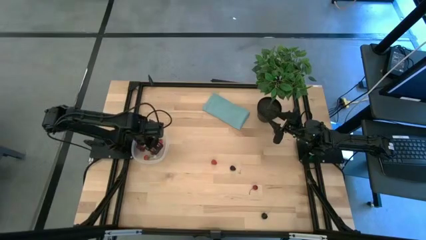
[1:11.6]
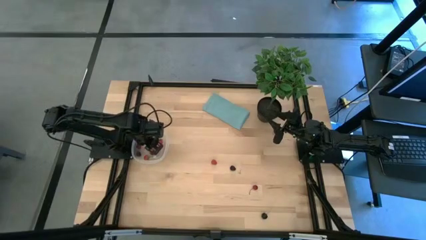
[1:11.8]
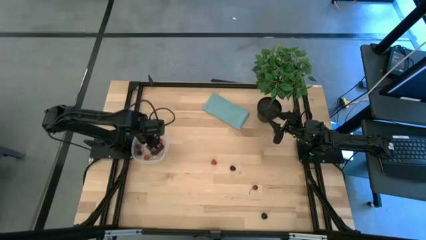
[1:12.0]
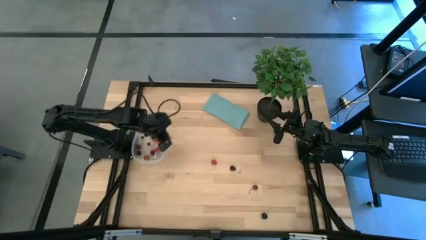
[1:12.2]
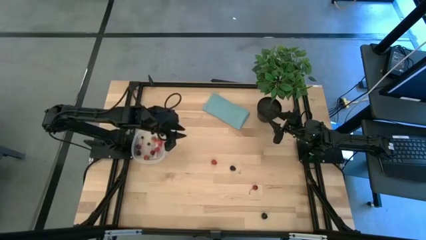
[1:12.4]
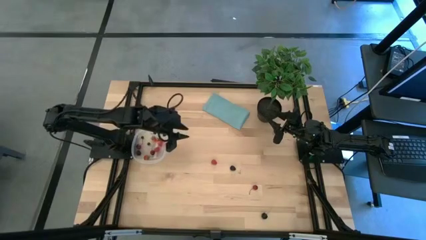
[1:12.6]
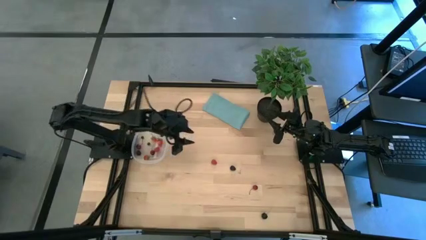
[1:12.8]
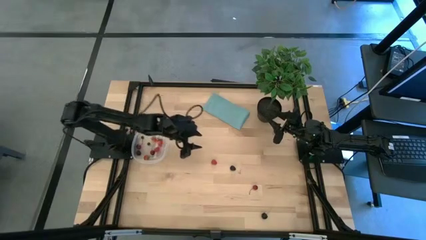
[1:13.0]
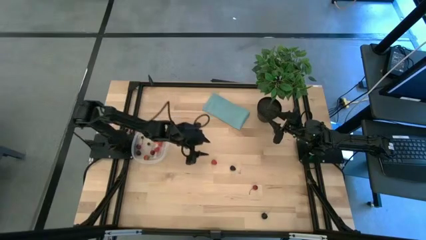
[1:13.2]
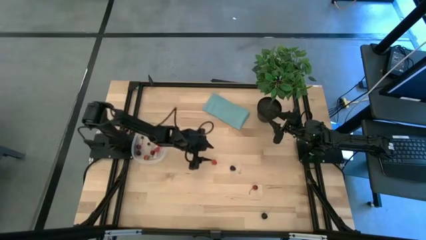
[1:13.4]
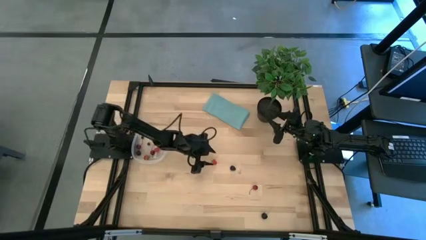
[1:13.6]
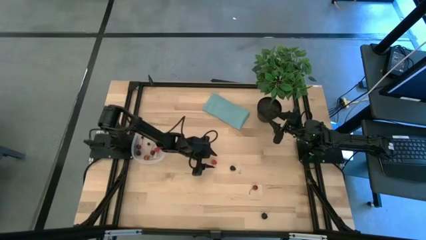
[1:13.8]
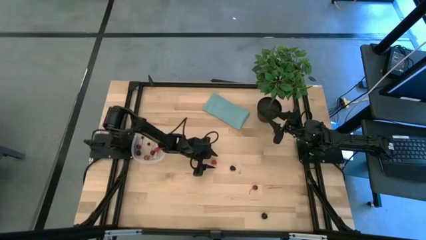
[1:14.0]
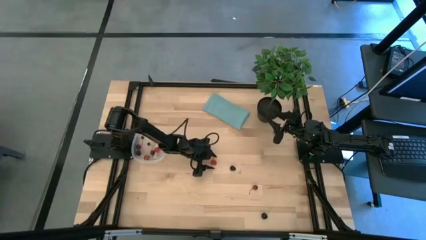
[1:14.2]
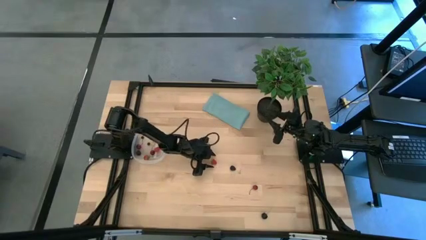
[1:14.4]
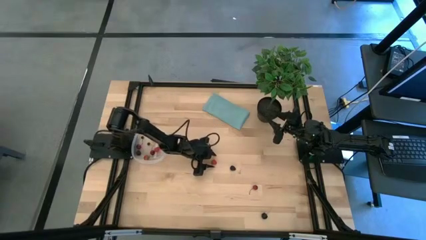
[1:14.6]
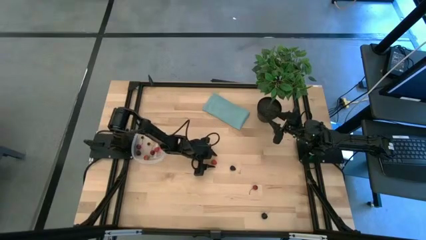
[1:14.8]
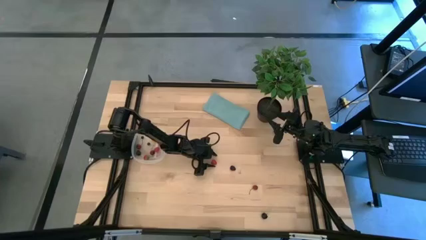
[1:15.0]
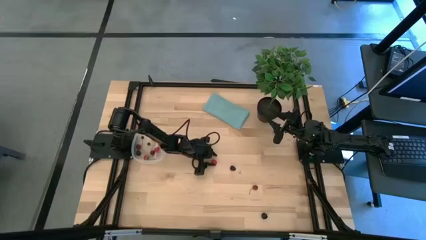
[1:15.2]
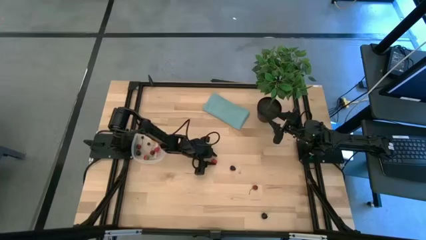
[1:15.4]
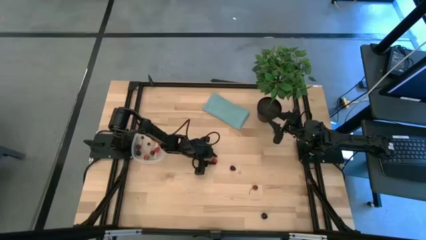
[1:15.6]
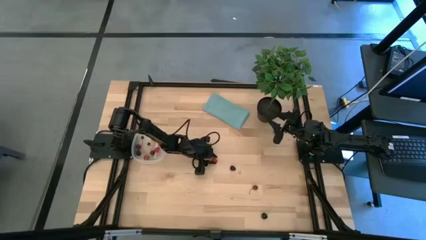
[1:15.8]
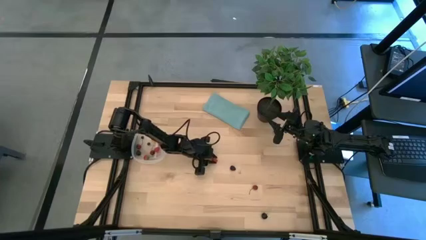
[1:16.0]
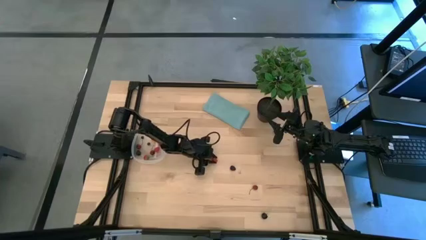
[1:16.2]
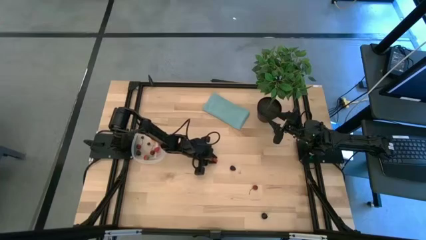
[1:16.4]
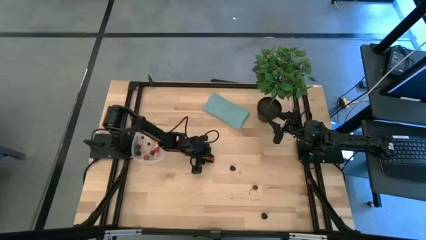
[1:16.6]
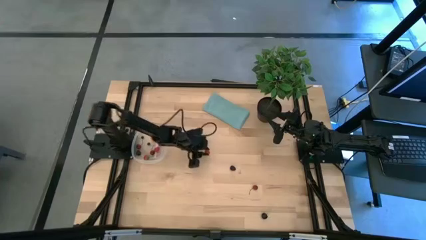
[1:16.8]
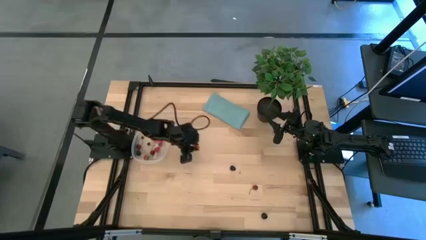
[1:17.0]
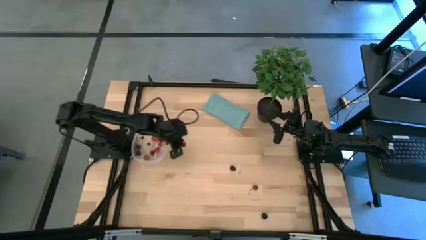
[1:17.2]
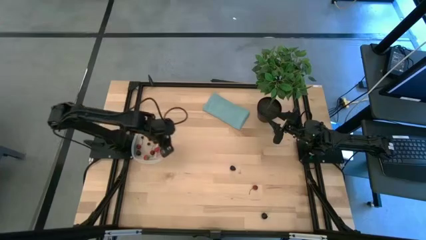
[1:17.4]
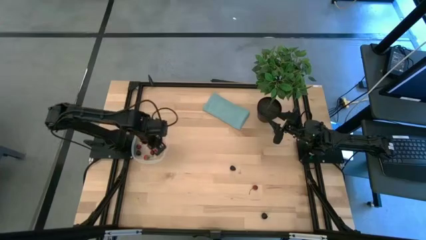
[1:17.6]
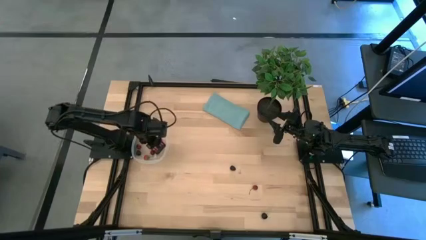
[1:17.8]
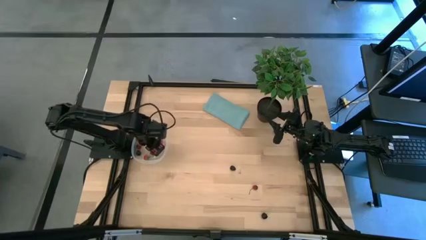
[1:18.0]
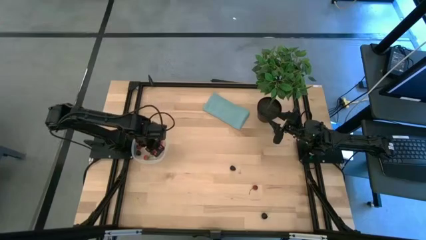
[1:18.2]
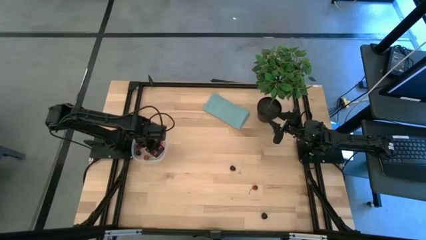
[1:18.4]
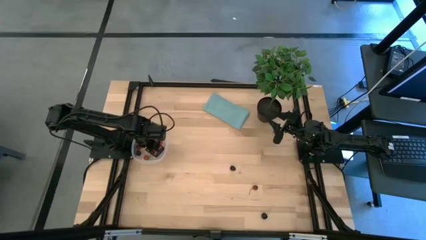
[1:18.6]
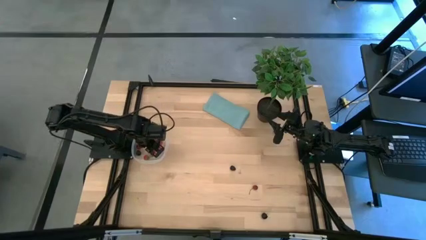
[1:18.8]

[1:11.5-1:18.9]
Task: Pick and placing Produce into tupperware
Put the red raspberry into the transparent bin

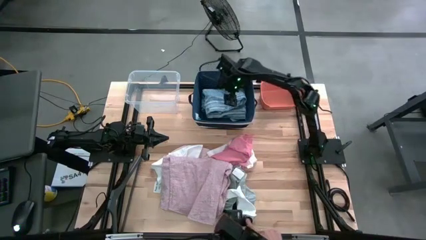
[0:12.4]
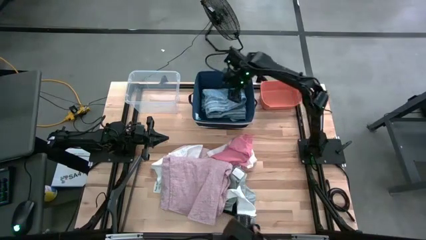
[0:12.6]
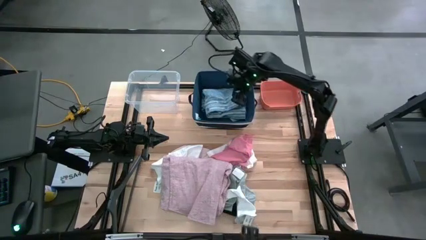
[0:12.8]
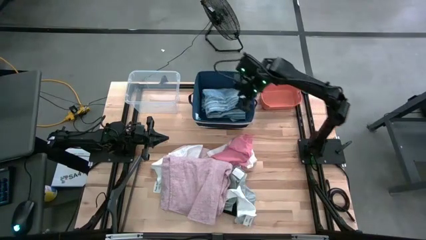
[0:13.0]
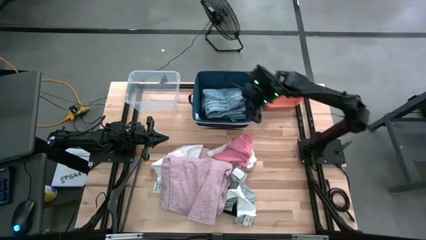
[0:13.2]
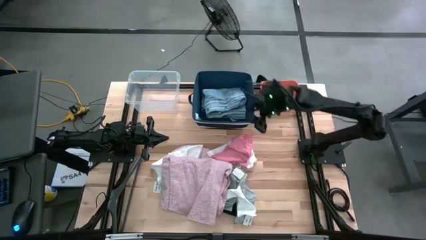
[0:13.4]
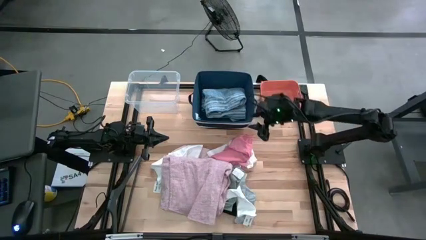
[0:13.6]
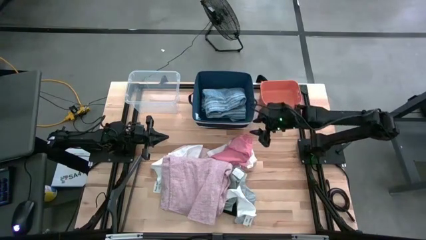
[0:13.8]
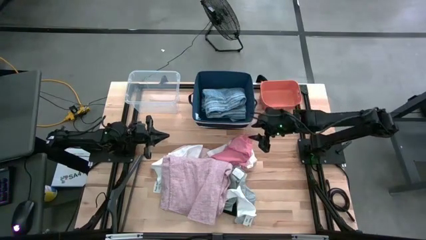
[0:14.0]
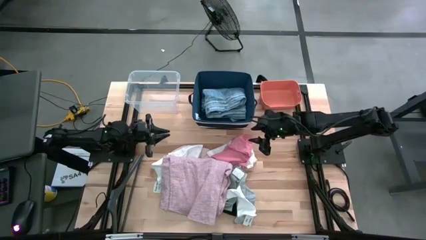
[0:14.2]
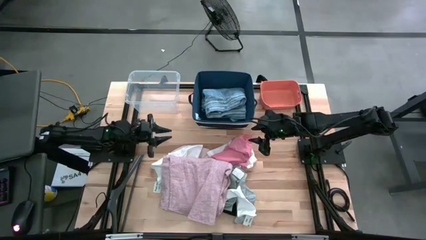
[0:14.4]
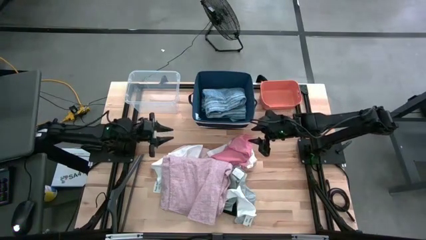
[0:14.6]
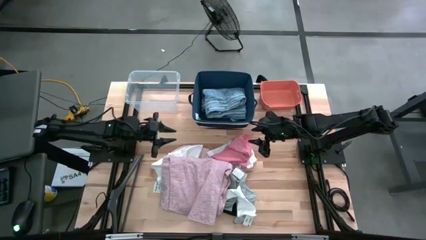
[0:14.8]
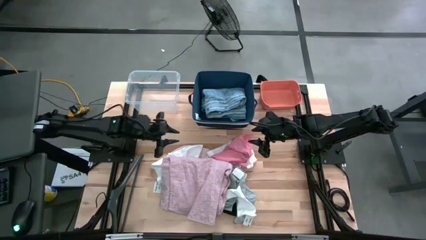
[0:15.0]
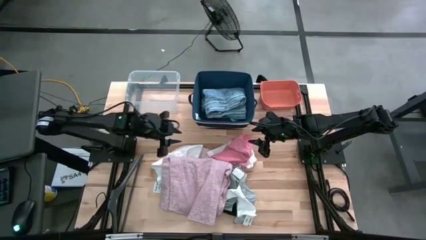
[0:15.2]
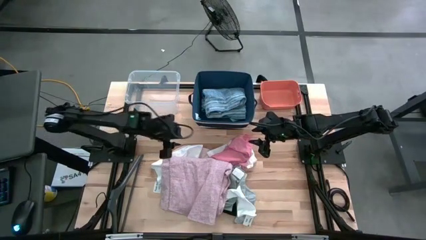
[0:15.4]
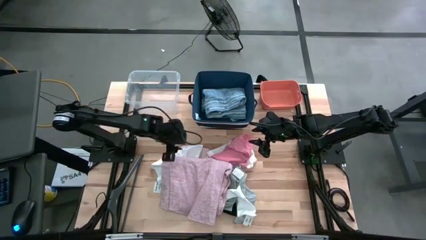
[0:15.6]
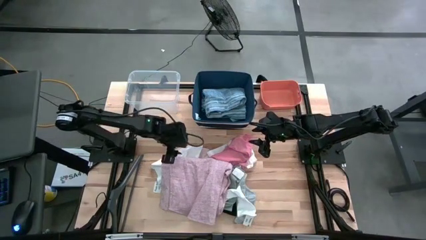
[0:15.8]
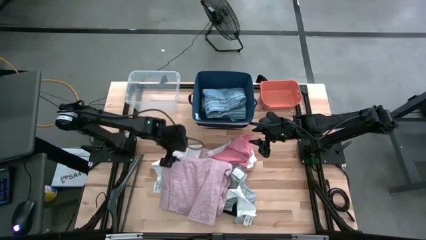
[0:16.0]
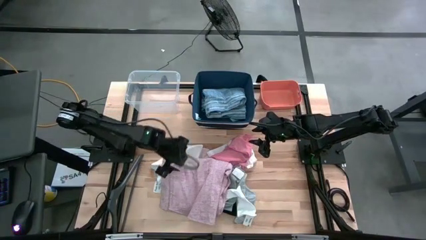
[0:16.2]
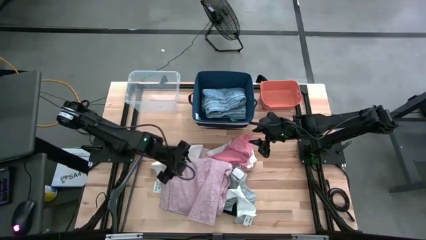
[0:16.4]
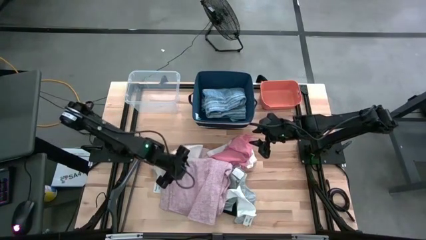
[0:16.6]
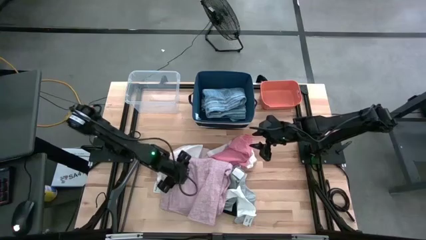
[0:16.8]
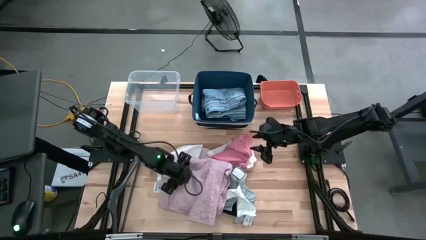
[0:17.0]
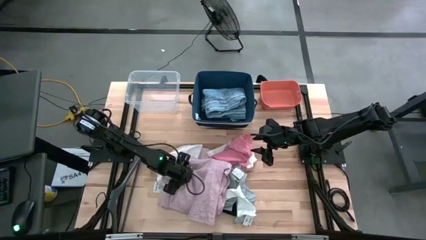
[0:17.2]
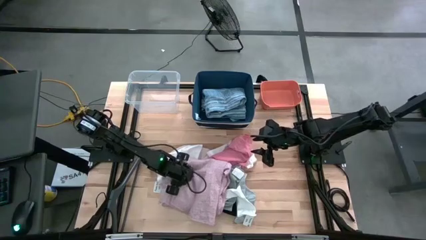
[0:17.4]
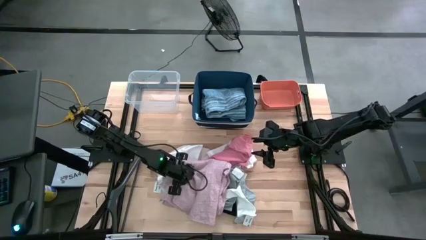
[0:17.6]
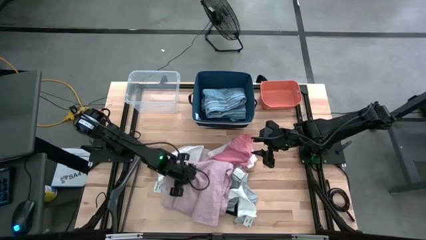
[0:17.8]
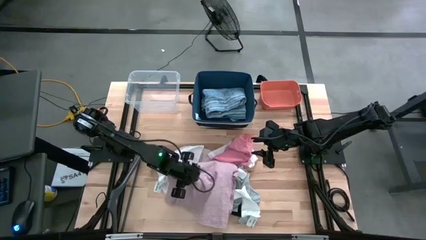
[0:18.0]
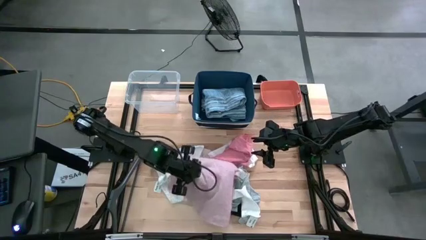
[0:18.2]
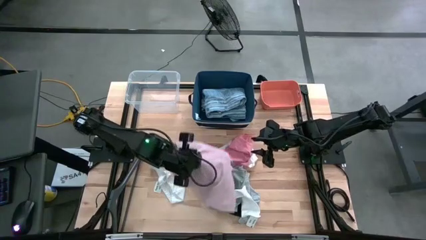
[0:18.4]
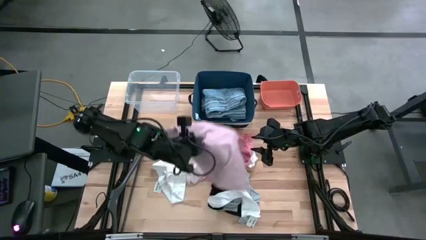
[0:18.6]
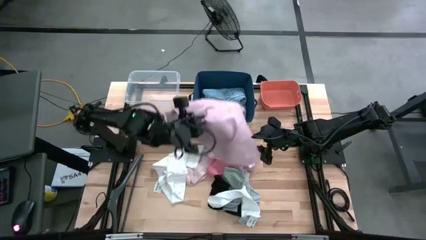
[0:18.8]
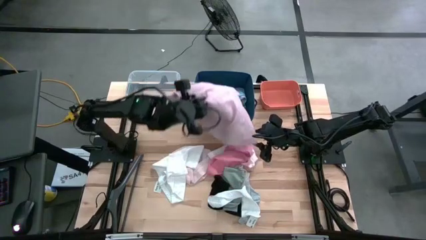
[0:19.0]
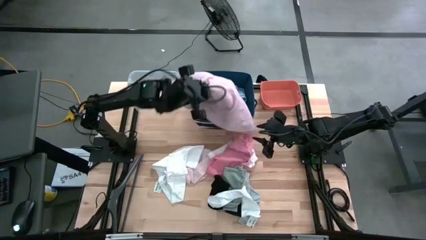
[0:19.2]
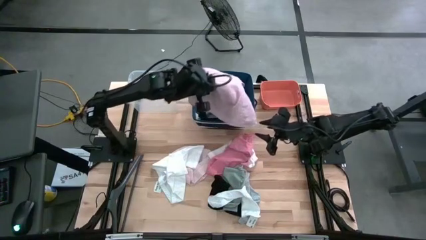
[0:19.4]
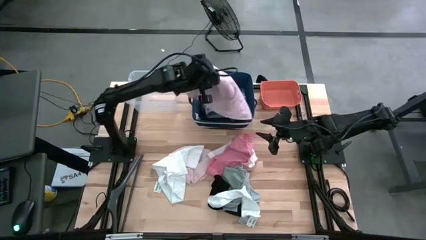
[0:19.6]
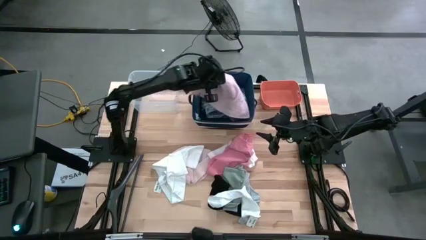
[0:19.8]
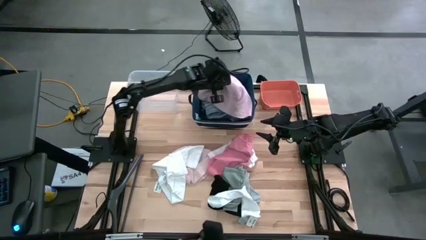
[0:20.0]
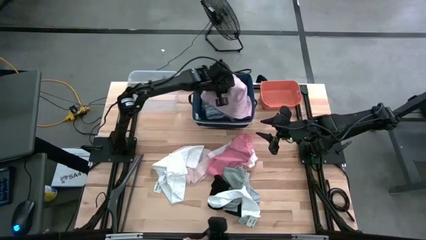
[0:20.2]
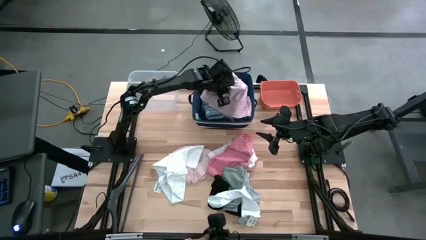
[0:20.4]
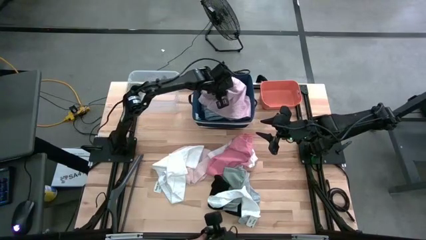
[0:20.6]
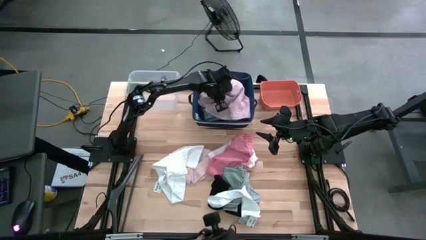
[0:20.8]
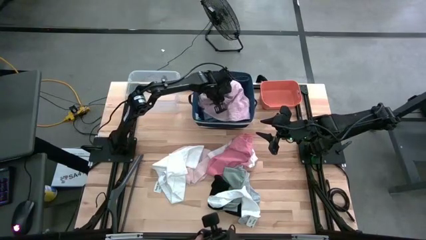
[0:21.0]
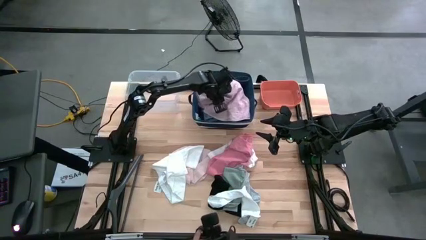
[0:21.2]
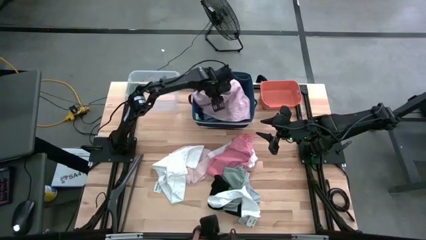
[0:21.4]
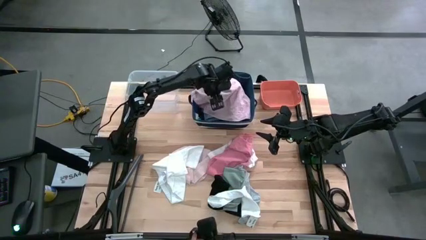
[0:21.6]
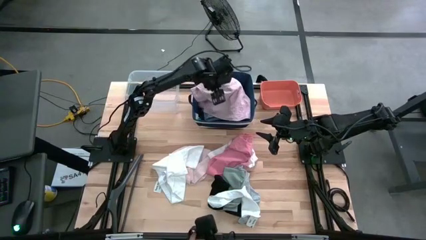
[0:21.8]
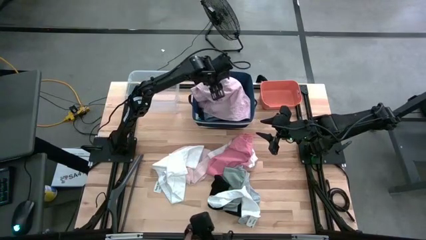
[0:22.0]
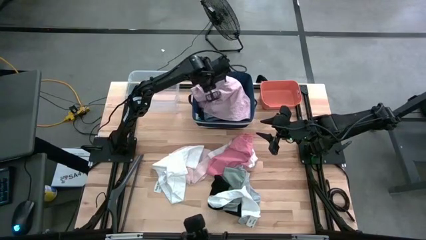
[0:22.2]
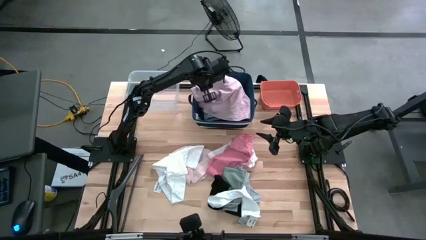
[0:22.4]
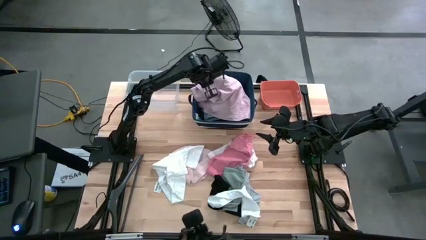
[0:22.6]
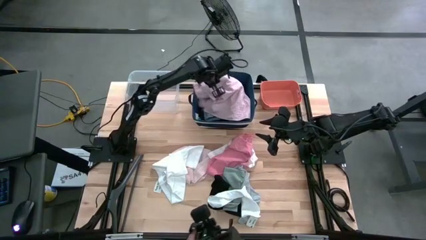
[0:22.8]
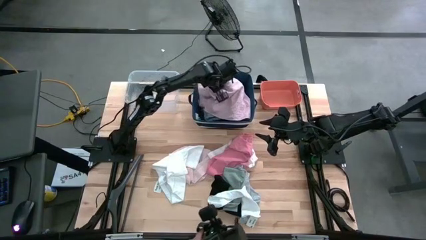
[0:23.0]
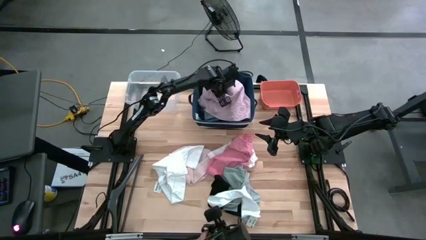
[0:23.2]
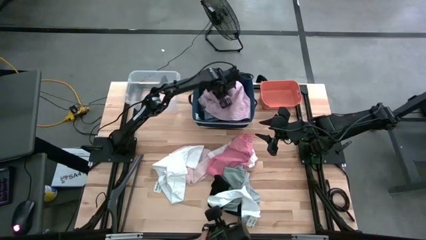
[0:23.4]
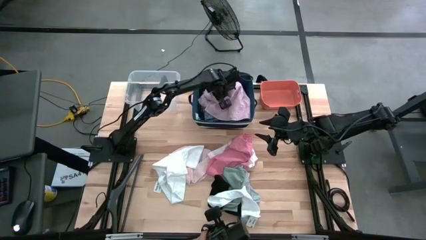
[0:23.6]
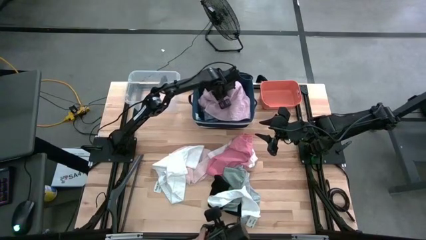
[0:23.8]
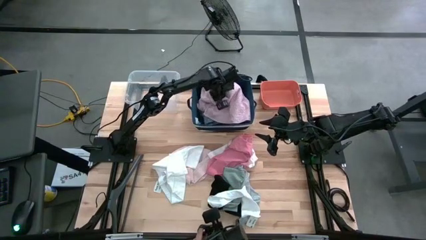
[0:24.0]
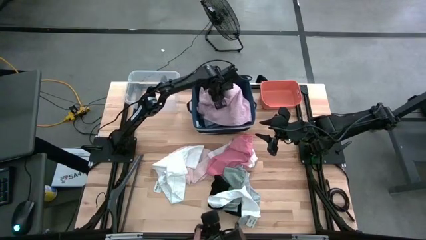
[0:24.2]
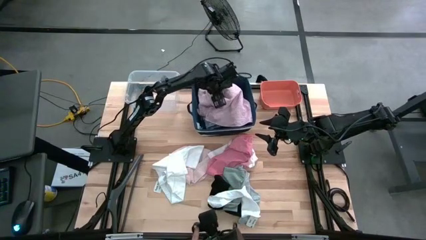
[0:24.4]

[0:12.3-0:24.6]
Task: Pick & Place Cloths
Put the pink shirt into the blue bin
